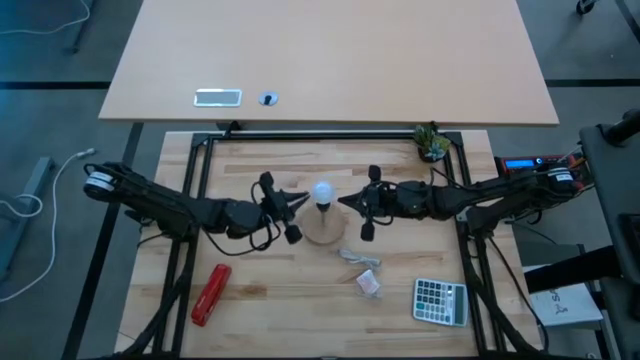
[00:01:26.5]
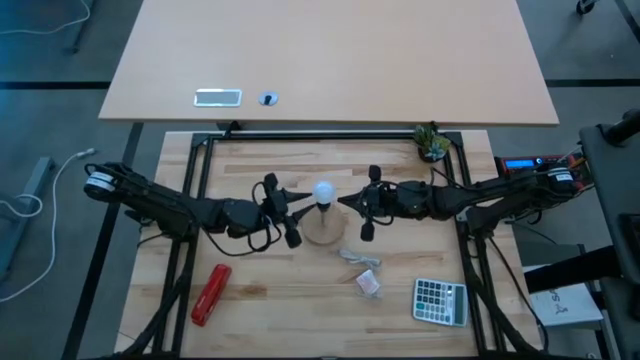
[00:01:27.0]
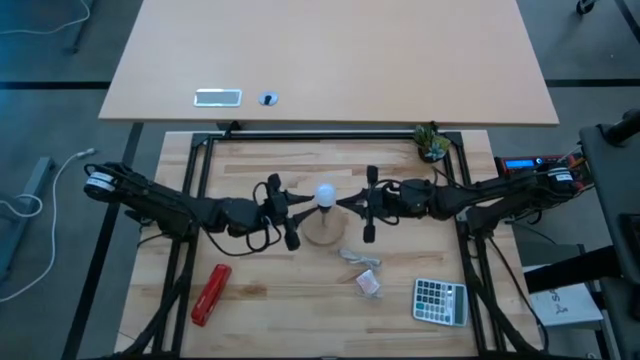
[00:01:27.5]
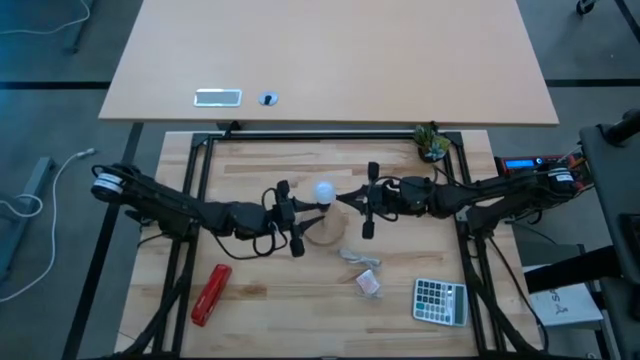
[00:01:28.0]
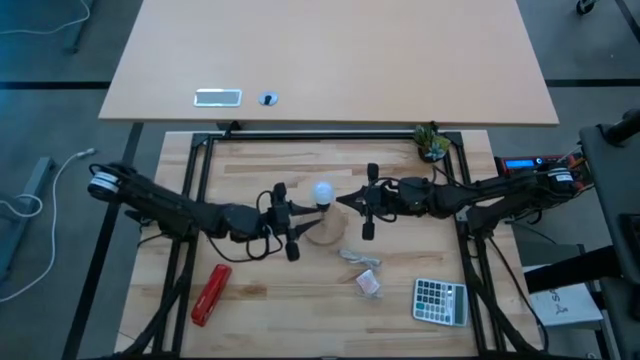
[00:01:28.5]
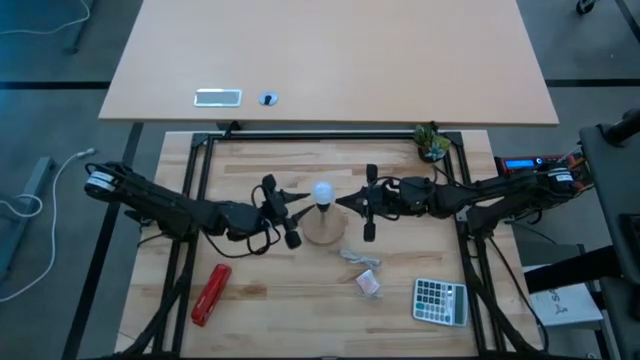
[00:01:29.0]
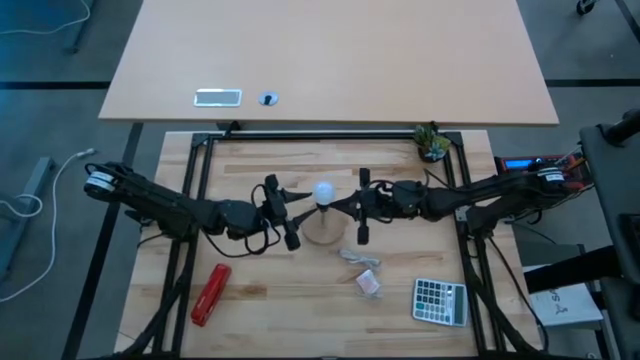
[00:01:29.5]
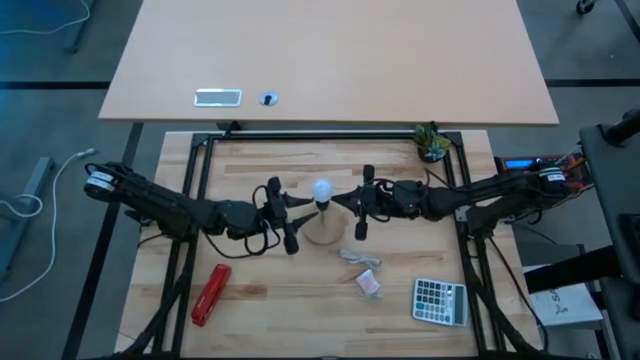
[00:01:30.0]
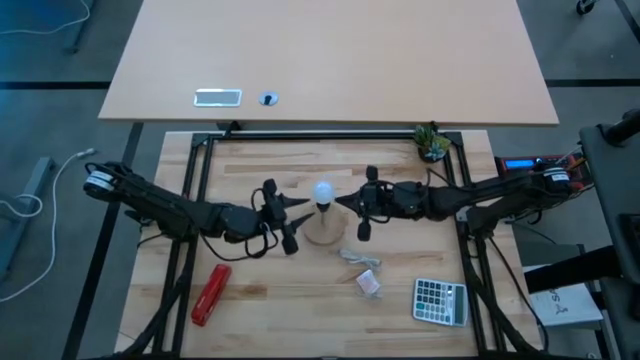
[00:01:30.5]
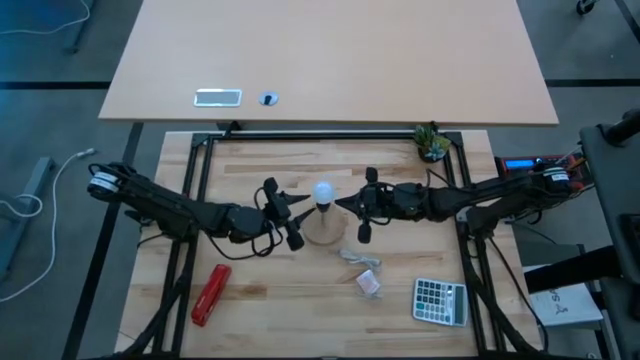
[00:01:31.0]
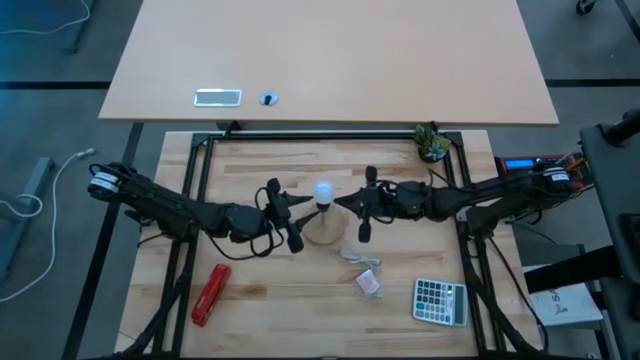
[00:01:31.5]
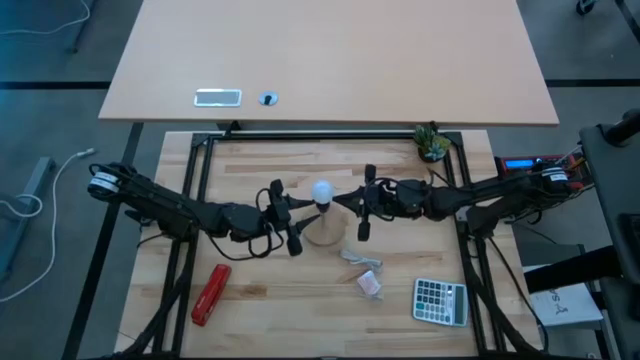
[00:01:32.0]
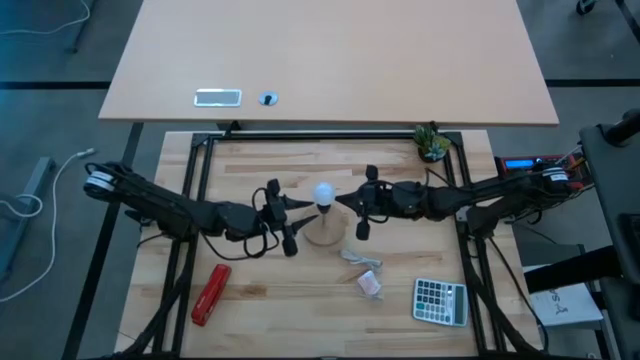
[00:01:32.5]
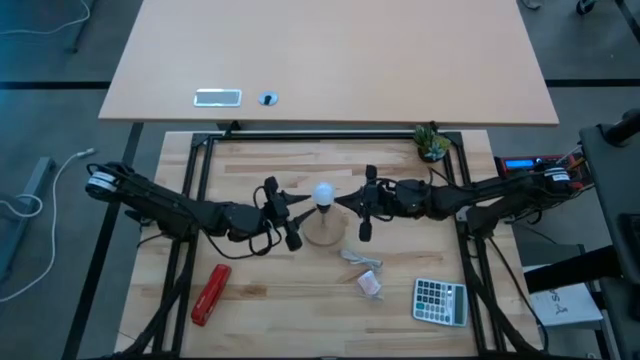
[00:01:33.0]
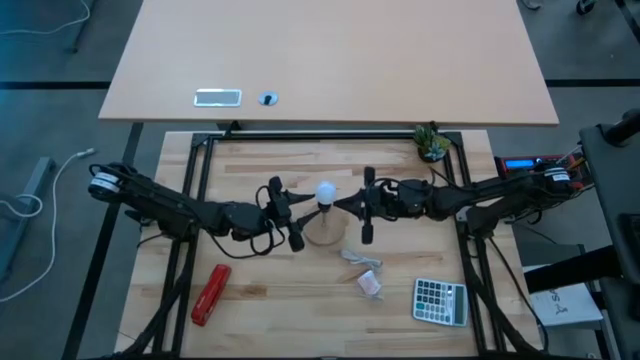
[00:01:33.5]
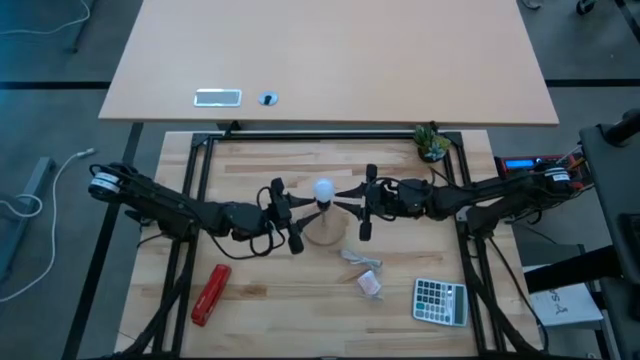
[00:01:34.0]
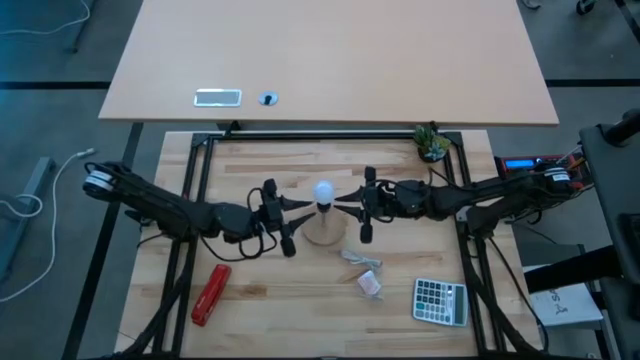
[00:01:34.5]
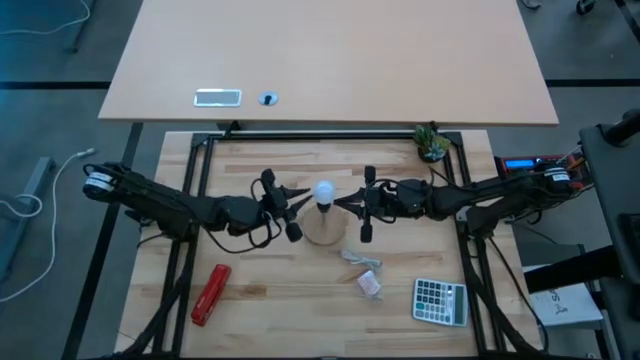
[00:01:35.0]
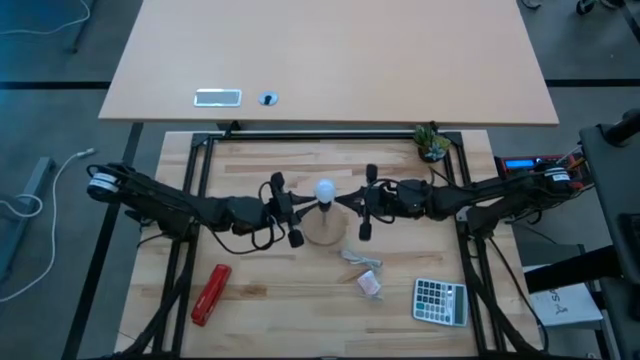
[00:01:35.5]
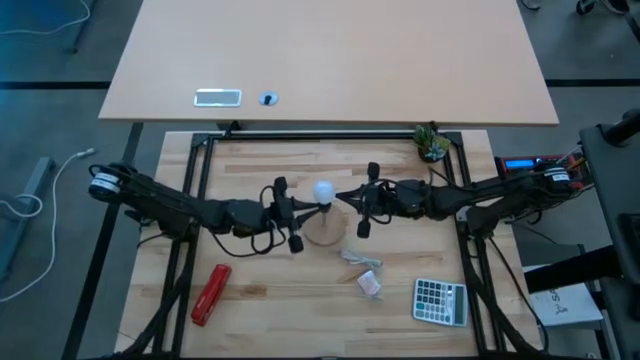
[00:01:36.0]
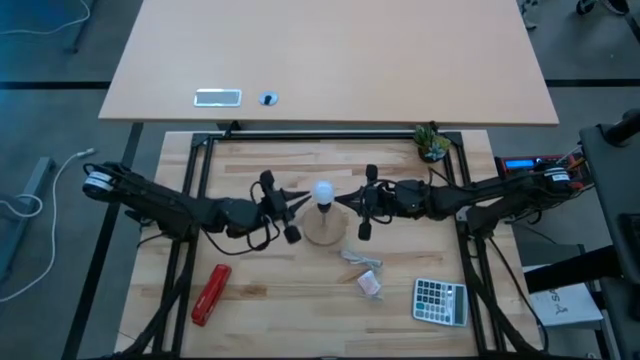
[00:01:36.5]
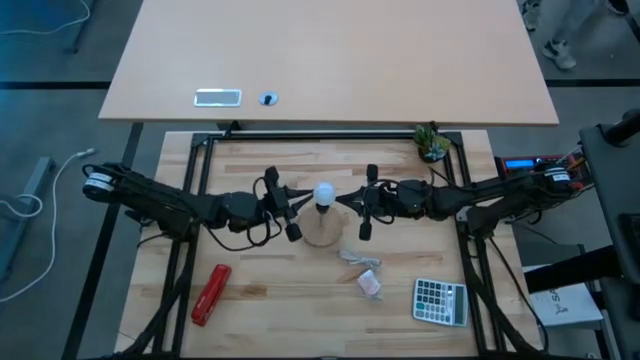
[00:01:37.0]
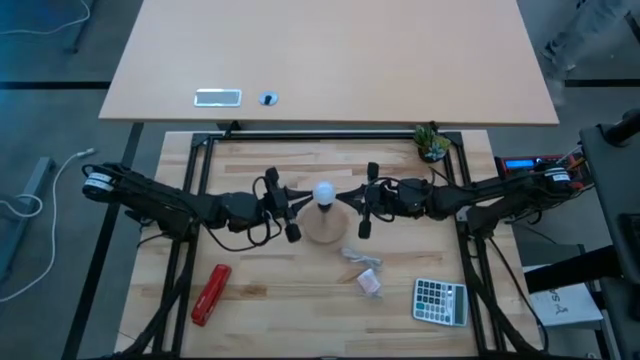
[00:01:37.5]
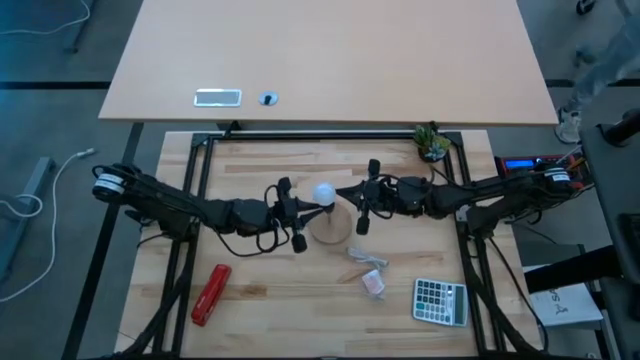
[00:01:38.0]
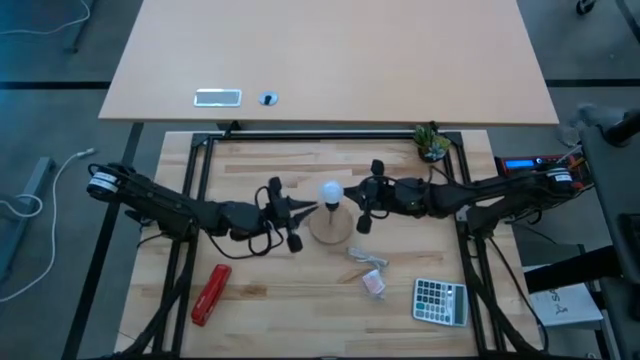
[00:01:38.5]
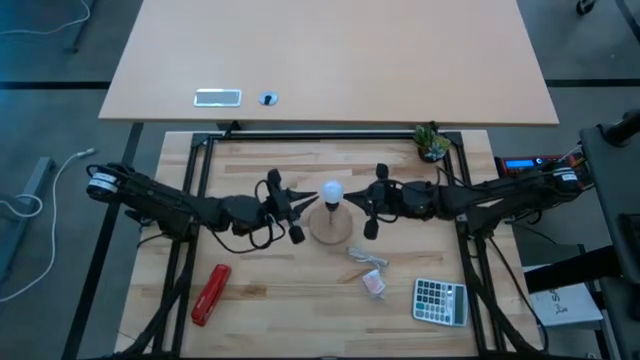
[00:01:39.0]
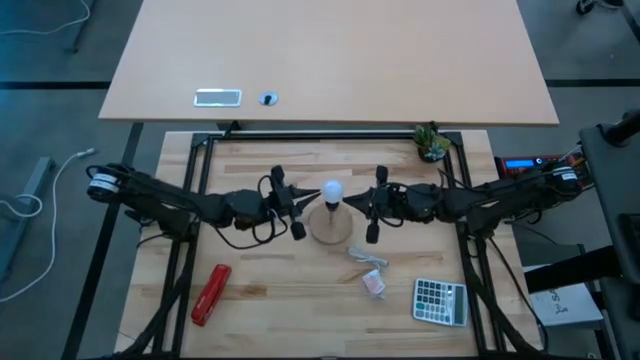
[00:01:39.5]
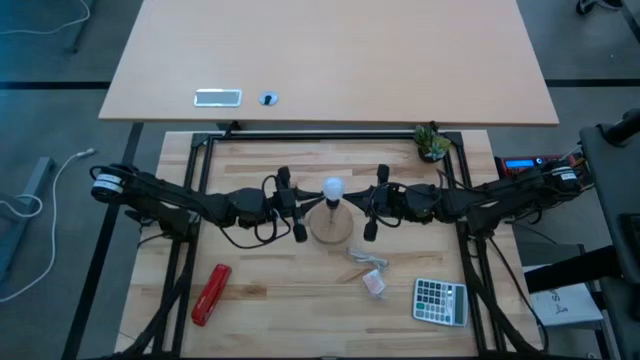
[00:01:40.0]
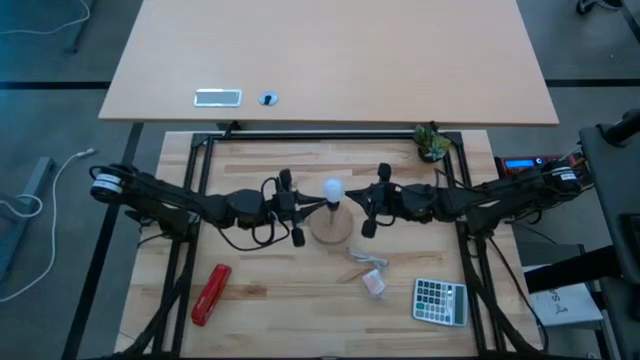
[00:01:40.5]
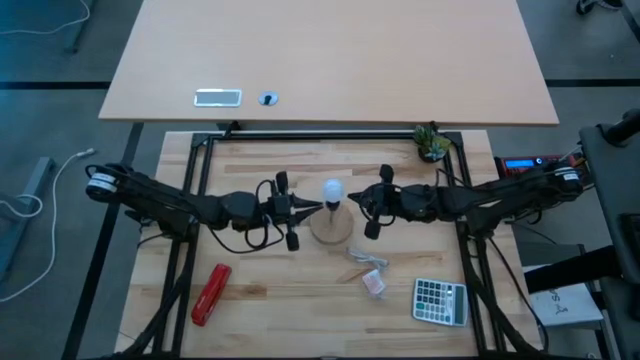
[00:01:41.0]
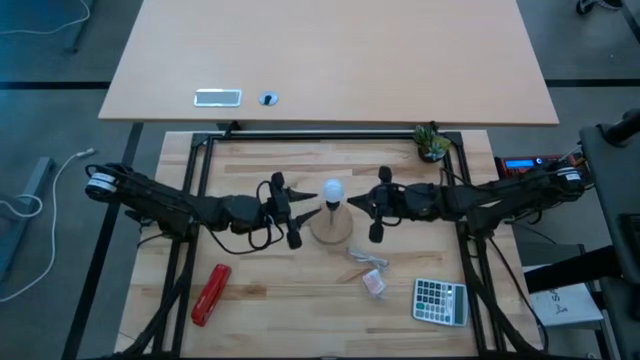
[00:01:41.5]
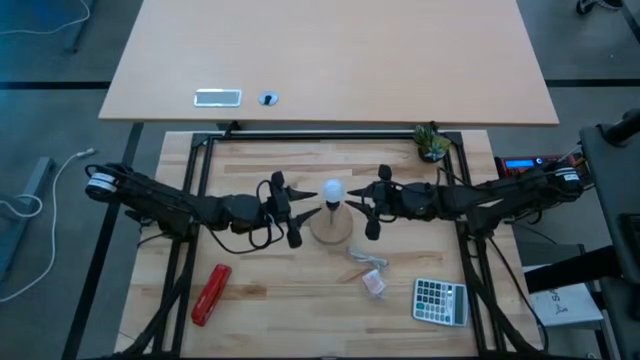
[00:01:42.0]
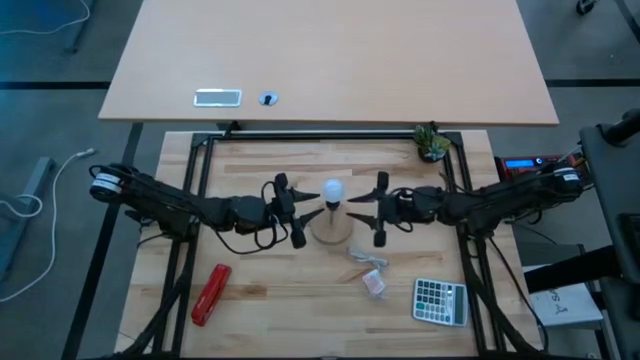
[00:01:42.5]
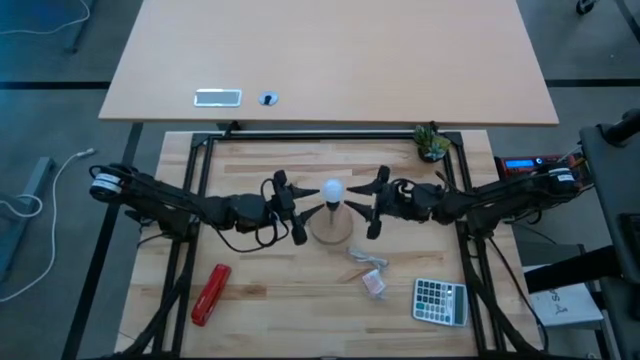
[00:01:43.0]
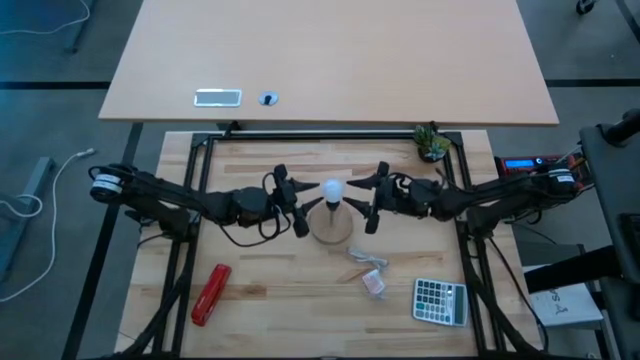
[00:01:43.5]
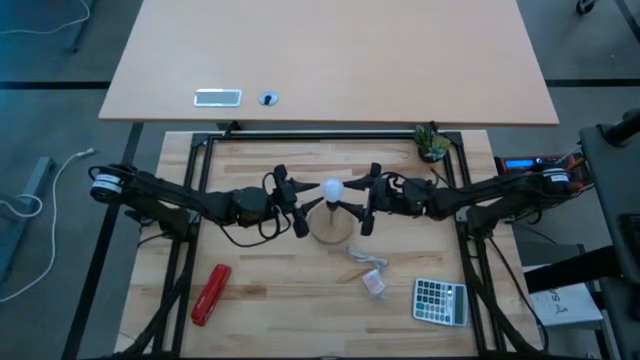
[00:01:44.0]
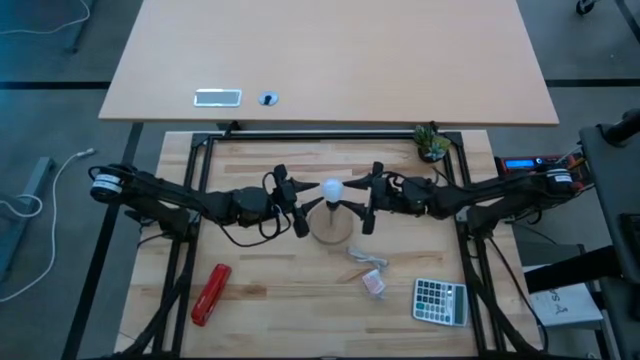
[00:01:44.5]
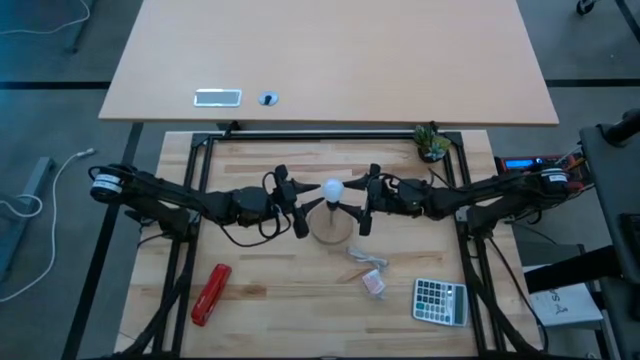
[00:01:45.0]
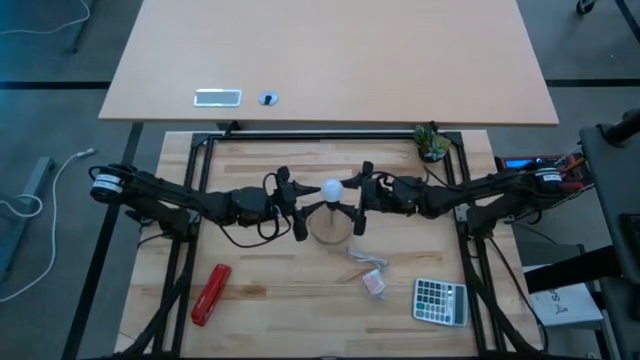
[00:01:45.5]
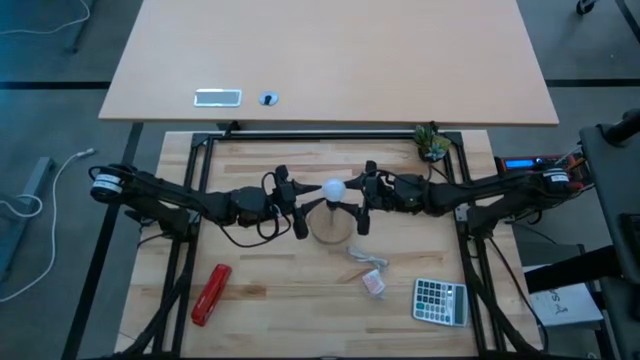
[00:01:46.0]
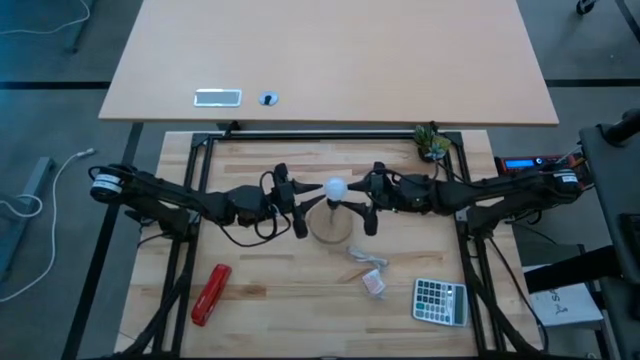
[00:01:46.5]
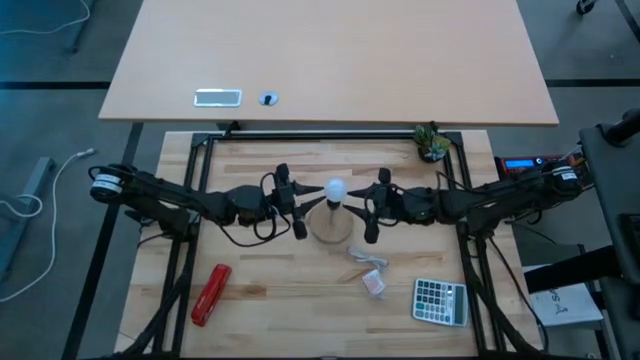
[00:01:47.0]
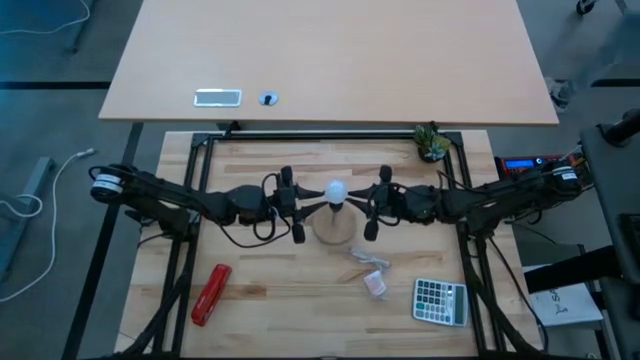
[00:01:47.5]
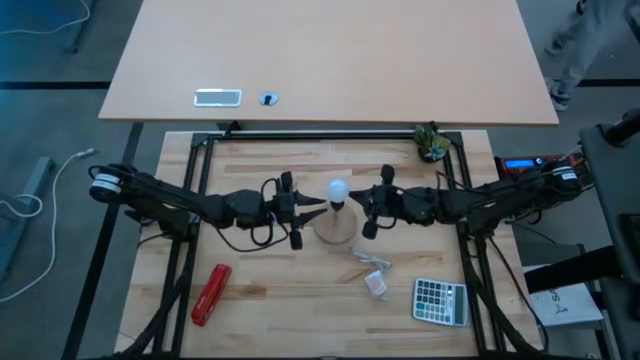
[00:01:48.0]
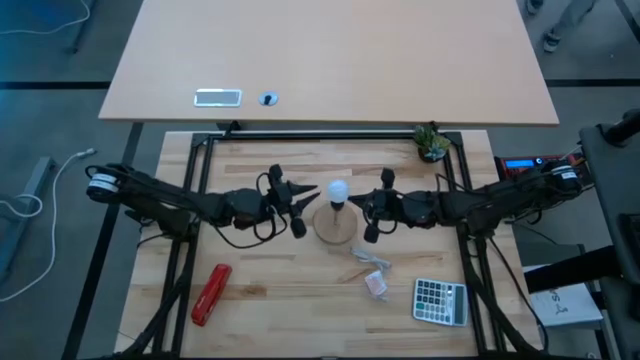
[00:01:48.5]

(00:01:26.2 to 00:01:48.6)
Task: Screw lightbulb
Remove the lightbulb from the lamp
